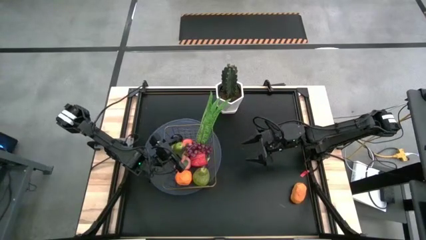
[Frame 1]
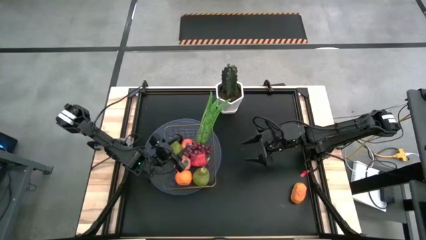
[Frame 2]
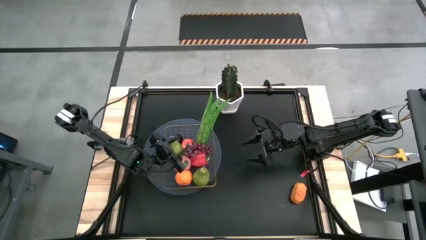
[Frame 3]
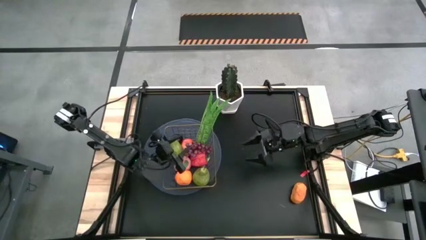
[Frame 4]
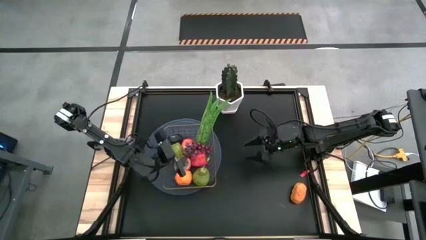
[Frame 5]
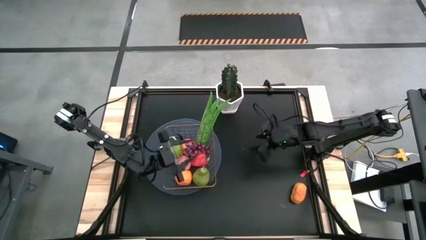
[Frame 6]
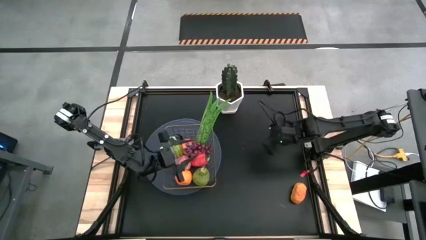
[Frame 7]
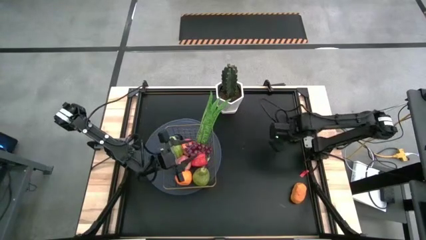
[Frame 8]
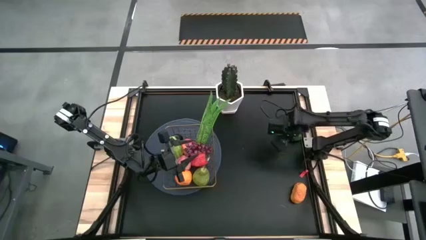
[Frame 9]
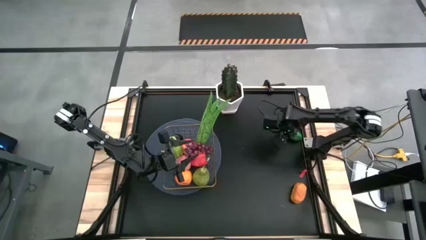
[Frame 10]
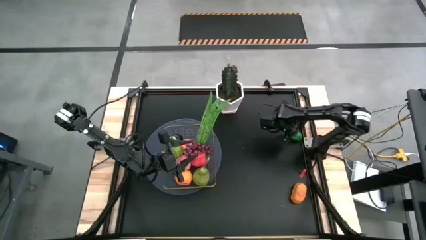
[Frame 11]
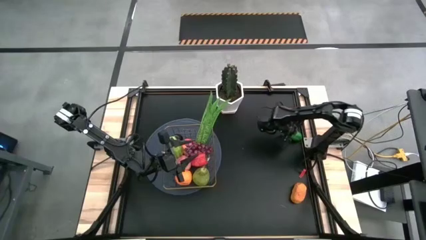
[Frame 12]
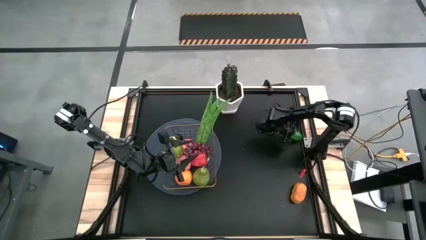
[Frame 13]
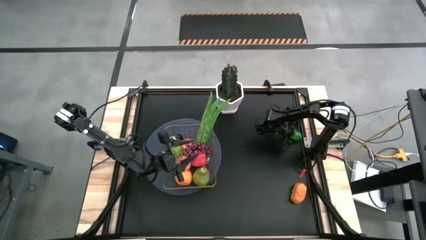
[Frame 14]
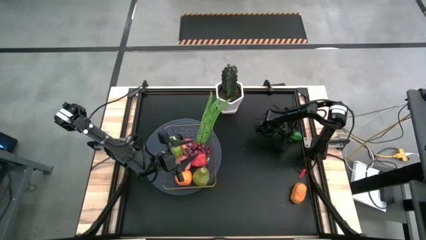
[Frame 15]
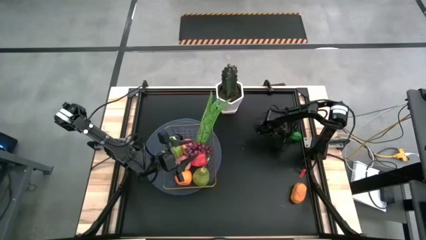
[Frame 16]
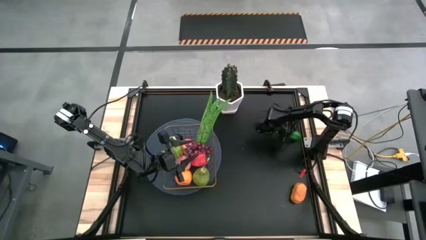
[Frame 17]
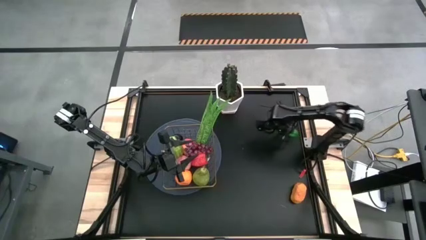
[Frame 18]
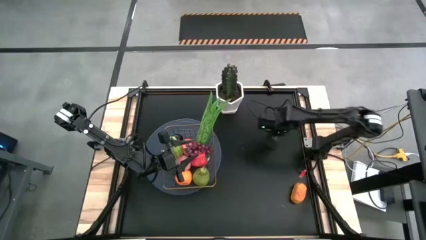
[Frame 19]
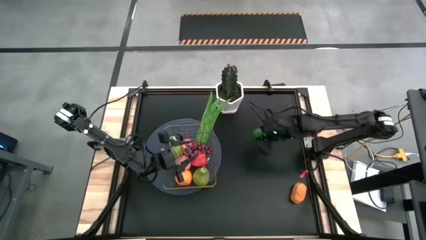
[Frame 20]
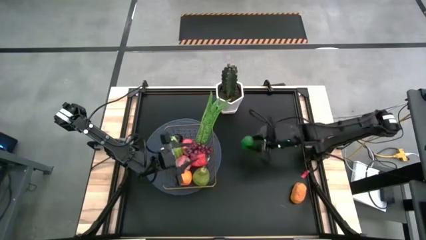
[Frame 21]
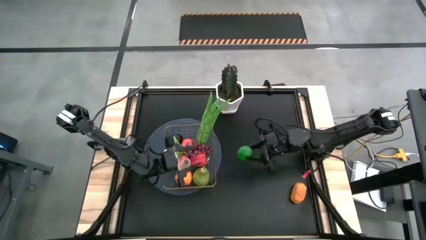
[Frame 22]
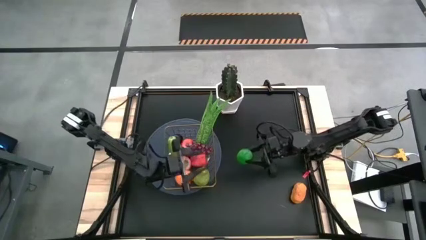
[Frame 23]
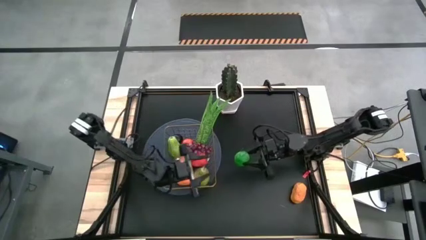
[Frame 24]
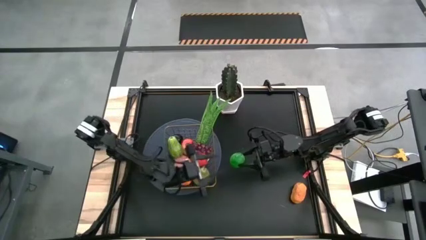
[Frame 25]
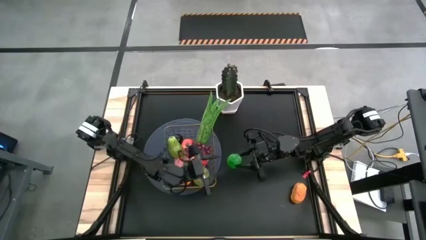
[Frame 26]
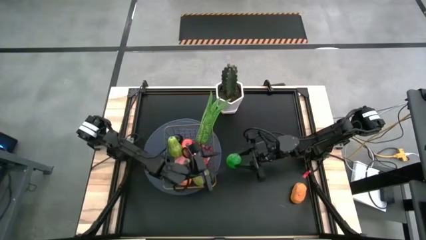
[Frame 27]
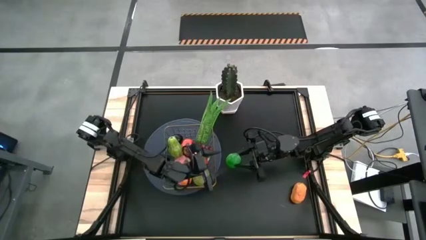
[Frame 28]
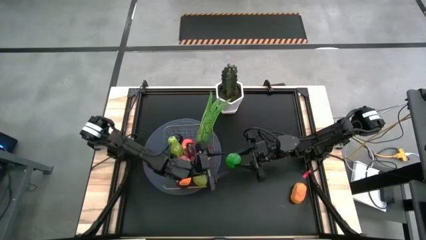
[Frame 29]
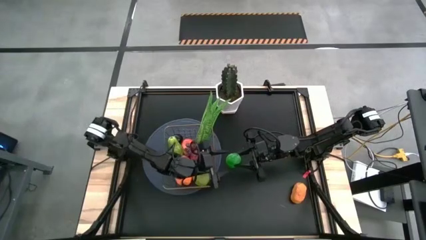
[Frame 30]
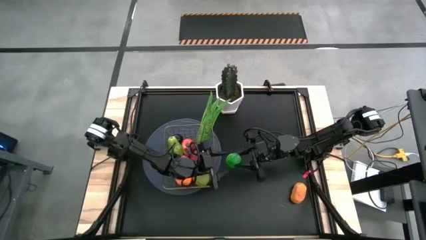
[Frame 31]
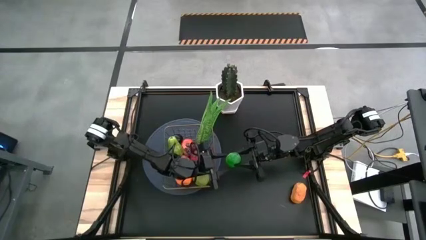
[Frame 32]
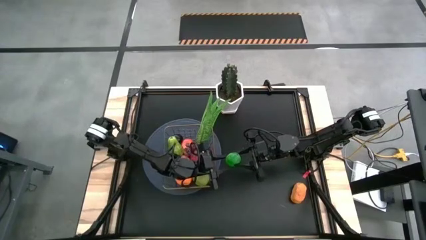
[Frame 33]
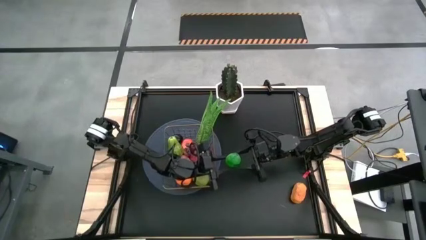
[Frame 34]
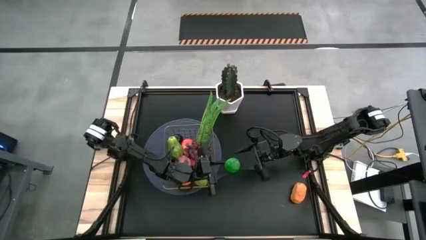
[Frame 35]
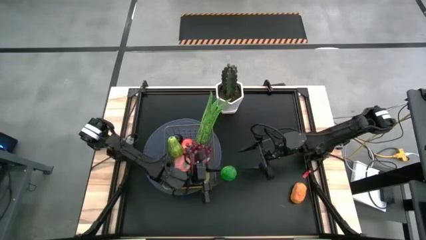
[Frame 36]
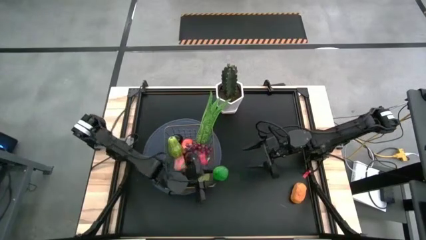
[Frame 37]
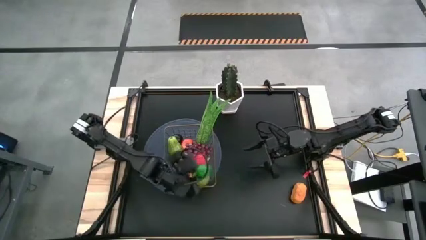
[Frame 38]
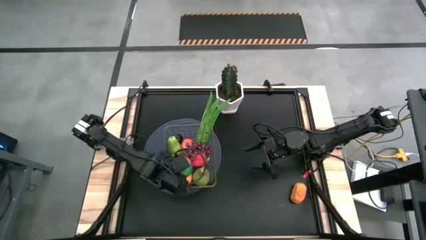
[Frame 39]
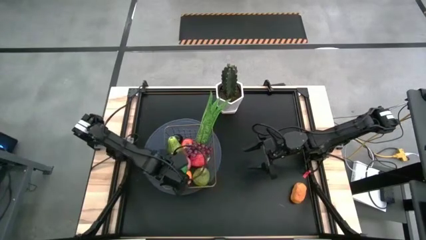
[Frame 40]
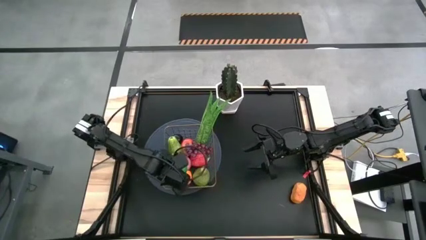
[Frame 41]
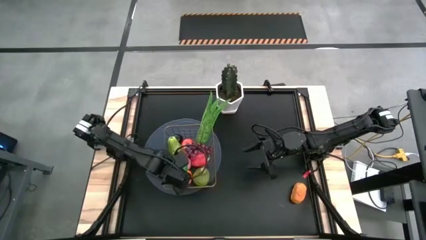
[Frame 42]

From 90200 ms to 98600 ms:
Task: Build produce basket
Put the green lime into the wire basket

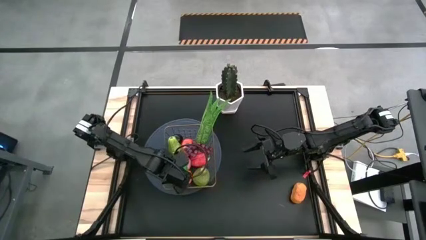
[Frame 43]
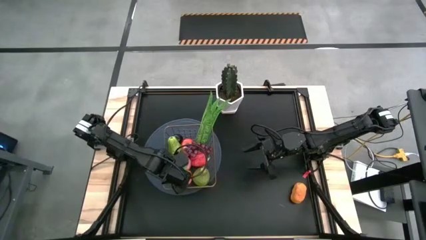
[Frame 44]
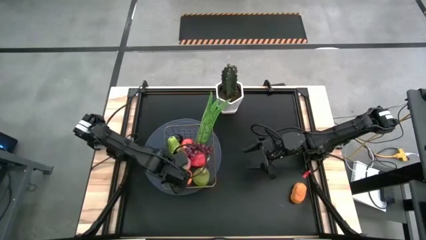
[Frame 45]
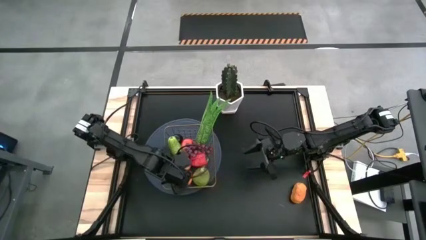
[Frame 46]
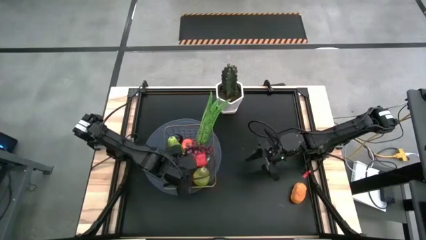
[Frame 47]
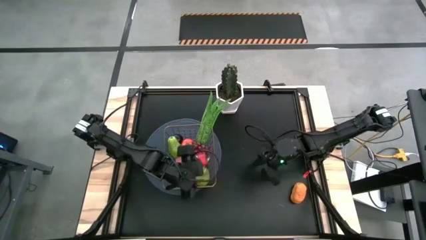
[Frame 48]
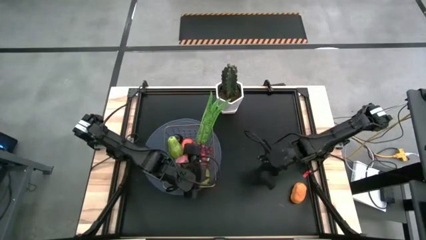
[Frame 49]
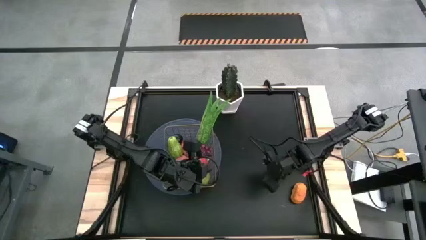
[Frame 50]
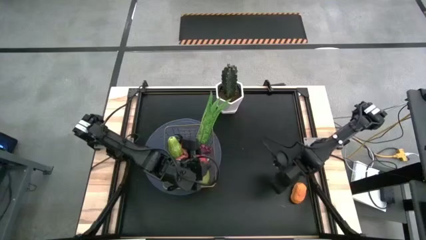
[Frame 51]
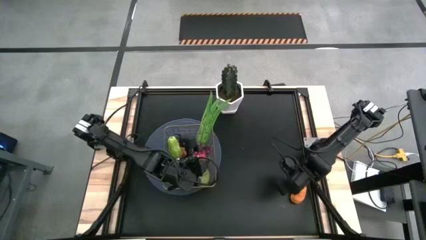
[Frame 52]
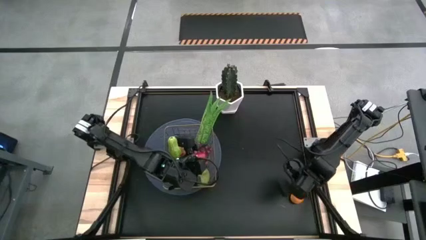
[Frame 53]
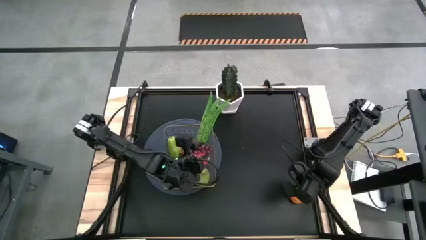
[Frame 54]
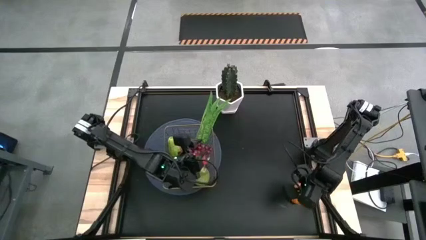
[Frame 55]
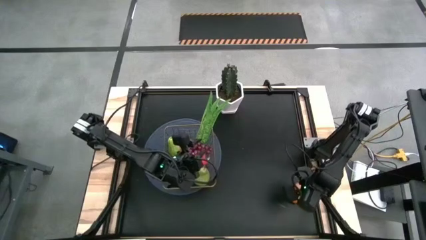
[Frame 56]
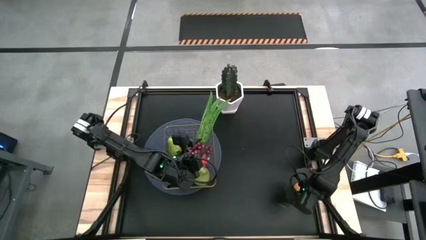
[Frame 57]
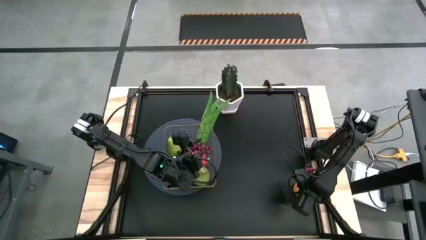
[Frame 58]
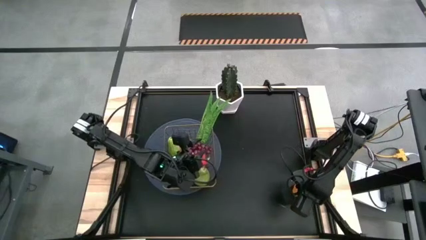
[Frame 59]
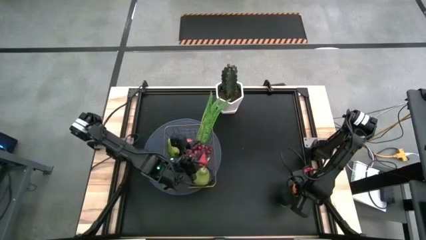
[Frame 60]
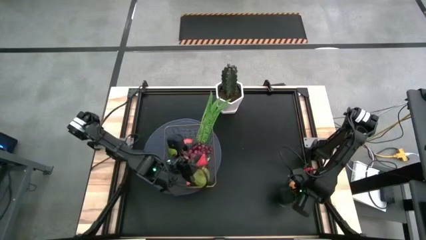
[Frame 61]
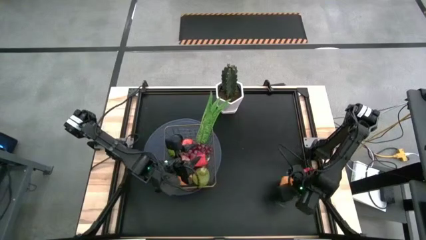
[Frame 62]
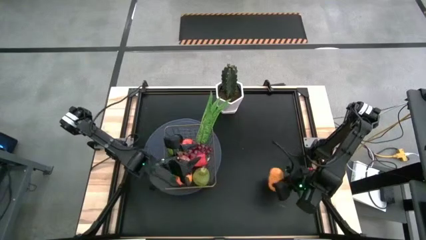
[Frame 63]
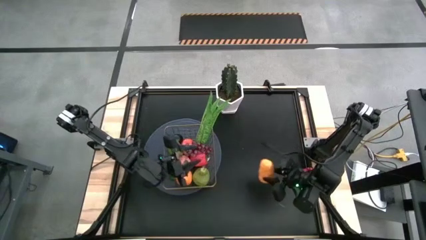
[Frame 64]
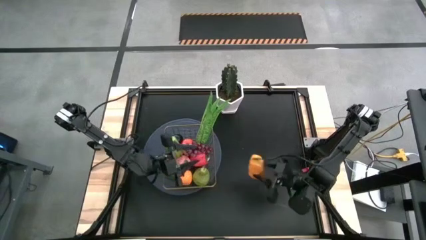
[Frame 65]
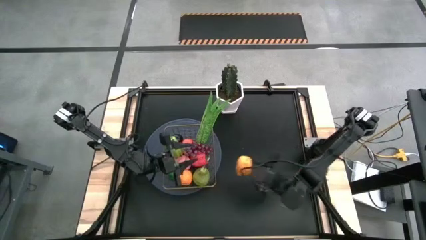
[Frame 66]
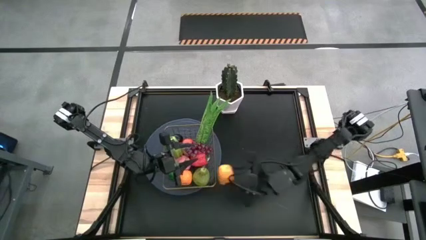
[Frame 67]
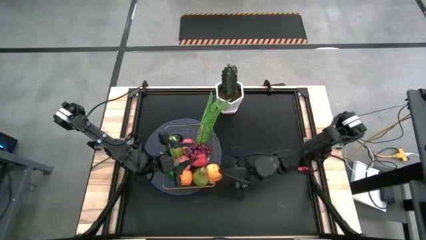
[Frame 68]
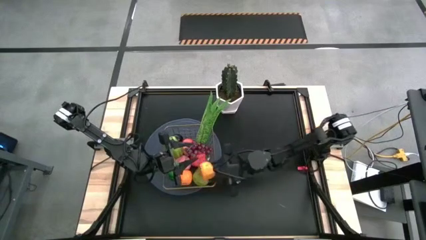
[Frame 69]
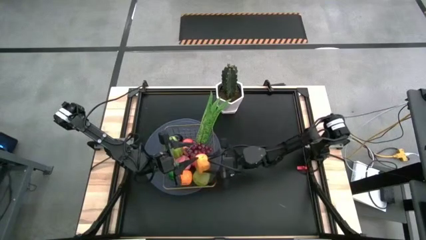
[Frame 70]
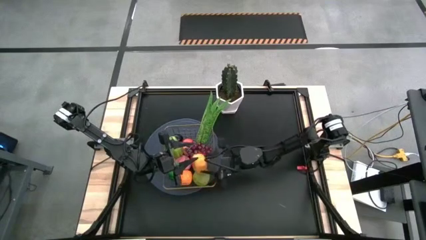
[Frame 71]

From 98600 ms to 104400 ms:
Put the brown potato into the wire basket

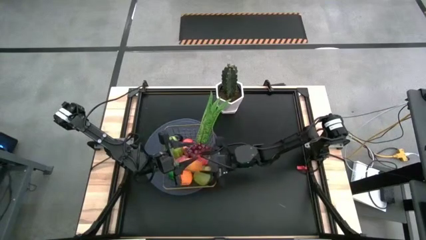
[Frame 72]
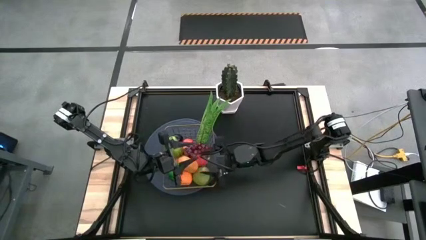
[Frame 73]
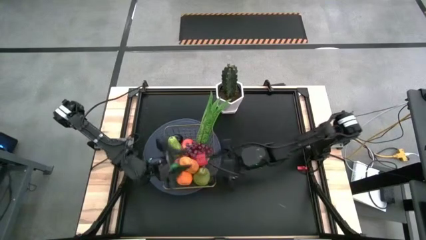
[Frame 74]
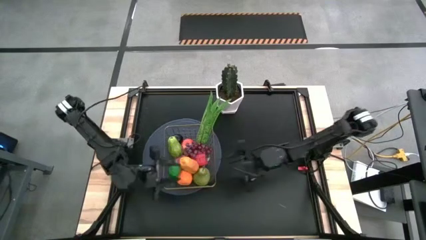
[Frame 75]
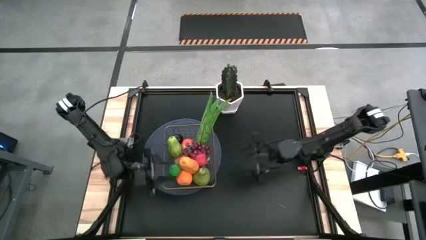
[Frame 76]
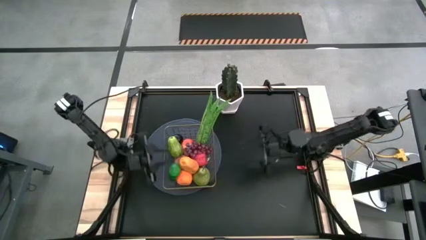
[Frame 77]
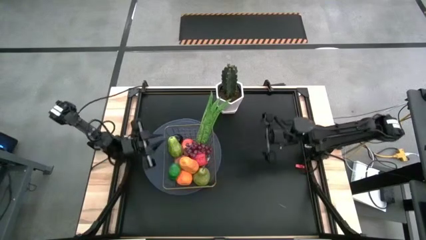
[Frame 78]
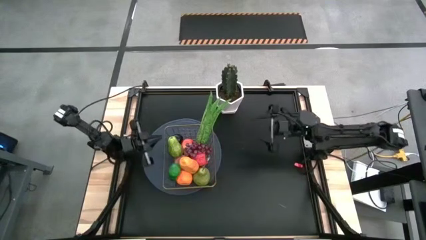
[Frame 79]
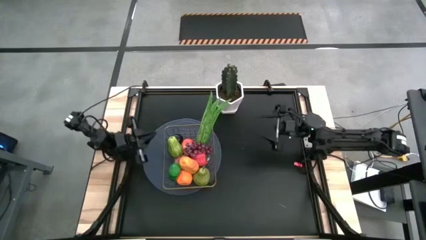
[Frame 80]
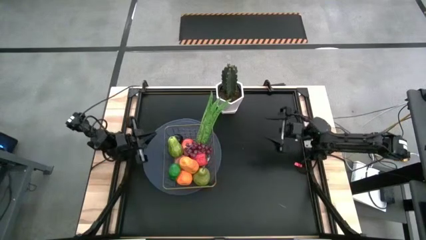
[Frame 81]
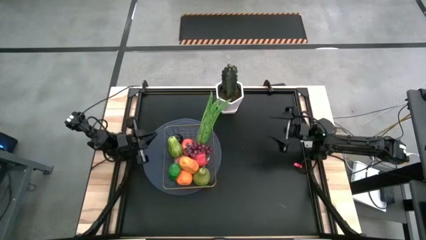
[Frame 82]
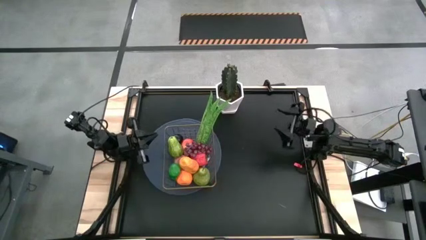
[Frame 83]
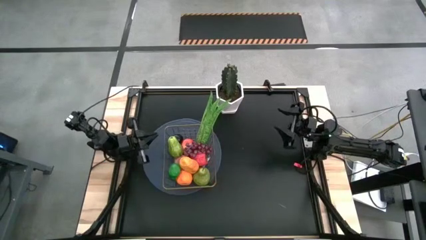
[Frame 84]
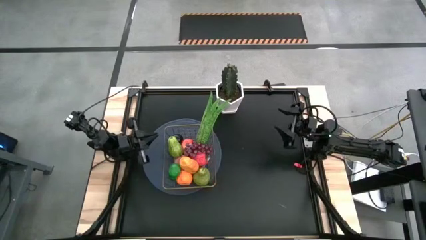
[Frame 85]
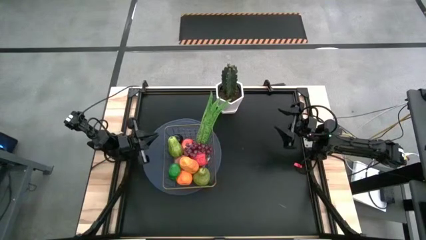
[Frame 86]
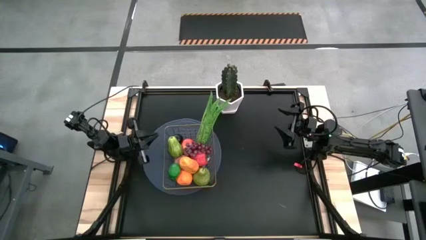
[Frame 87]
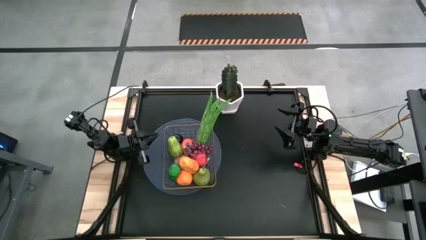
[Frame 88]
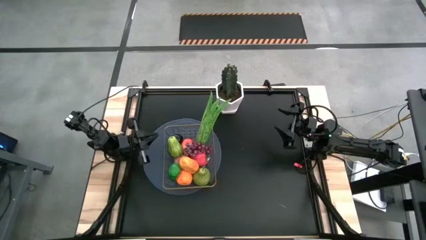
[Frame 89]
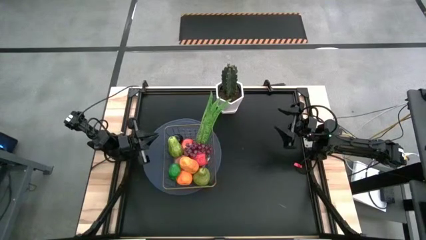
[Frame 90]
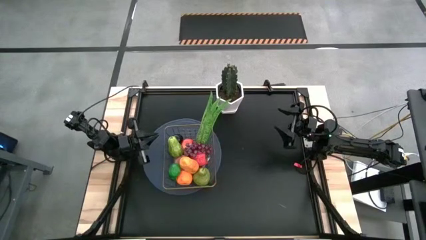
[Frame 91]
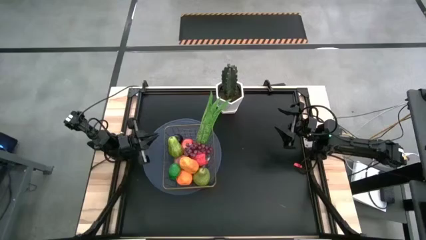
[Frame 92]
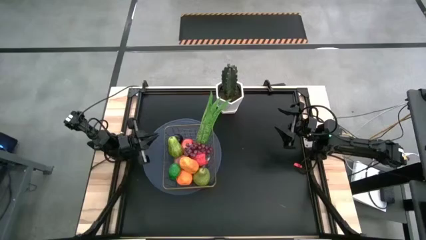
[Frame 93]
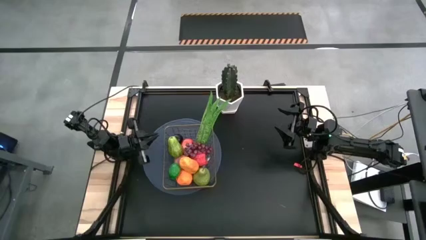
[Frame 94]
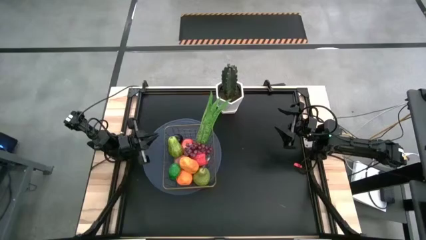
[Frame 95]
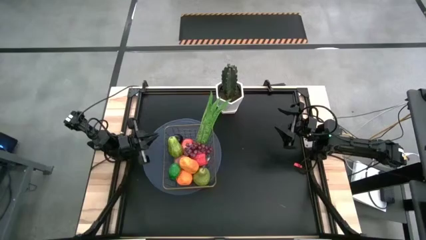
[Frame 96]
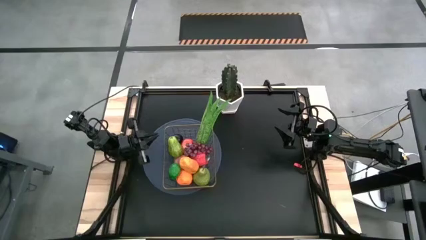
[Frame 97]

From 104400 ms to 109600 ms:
Return to Home Position
